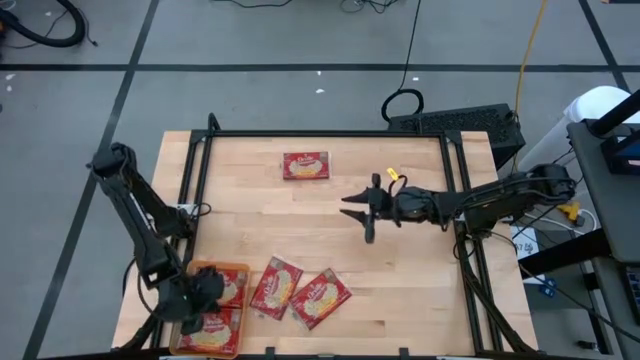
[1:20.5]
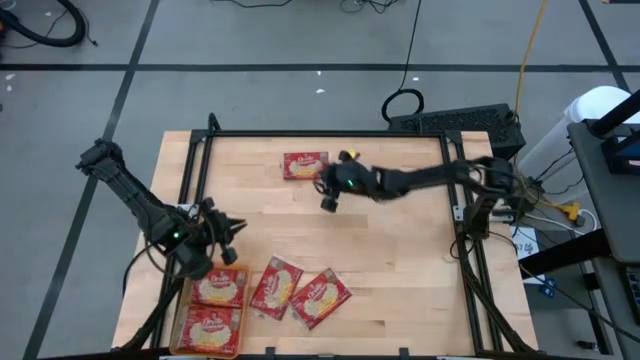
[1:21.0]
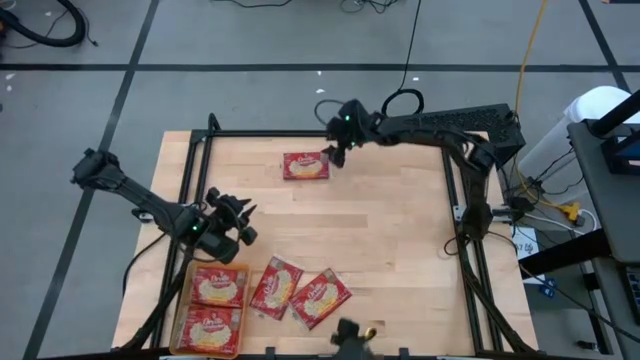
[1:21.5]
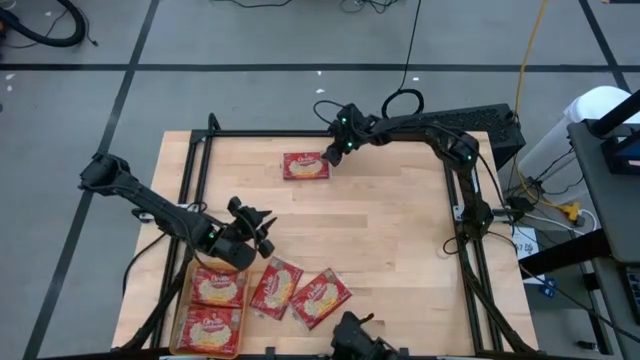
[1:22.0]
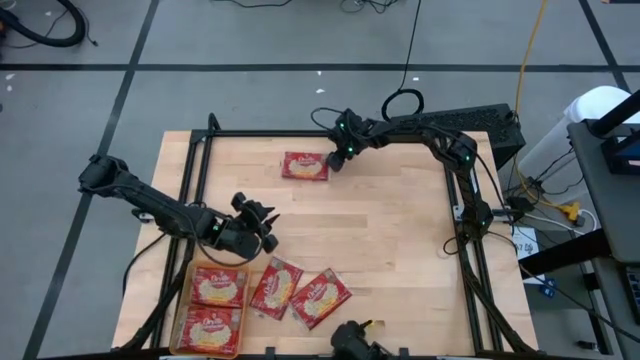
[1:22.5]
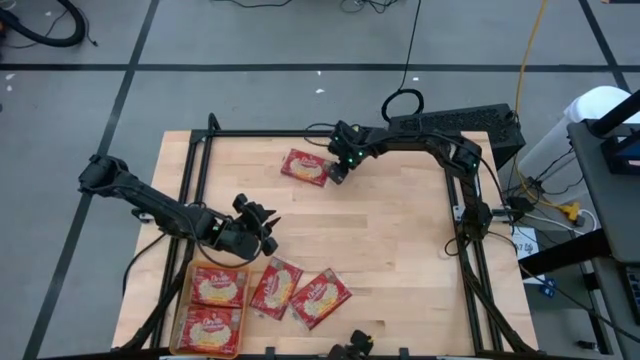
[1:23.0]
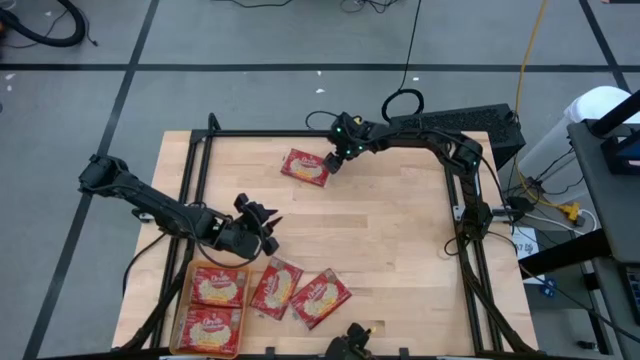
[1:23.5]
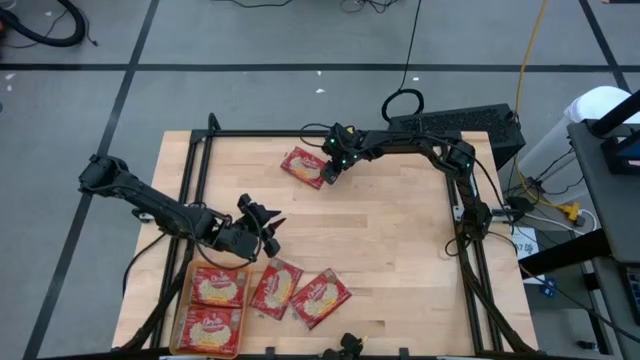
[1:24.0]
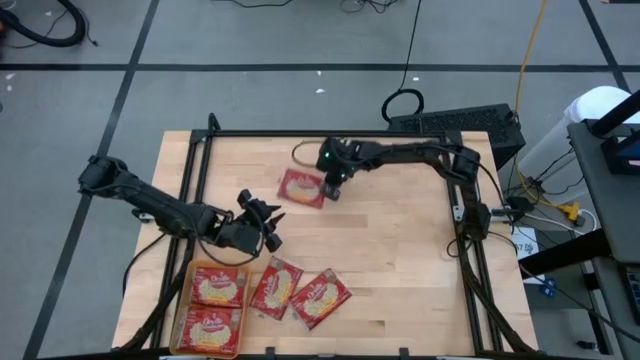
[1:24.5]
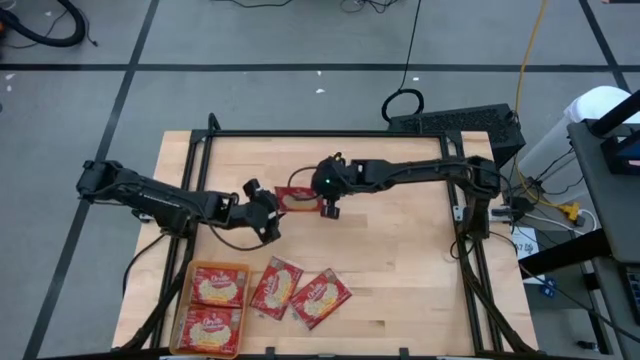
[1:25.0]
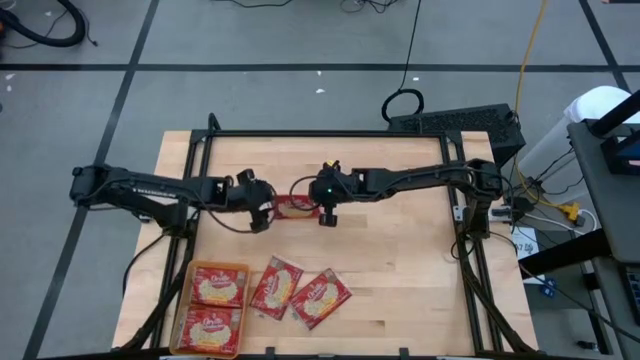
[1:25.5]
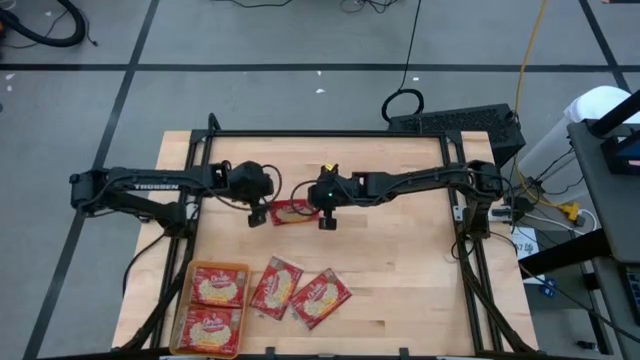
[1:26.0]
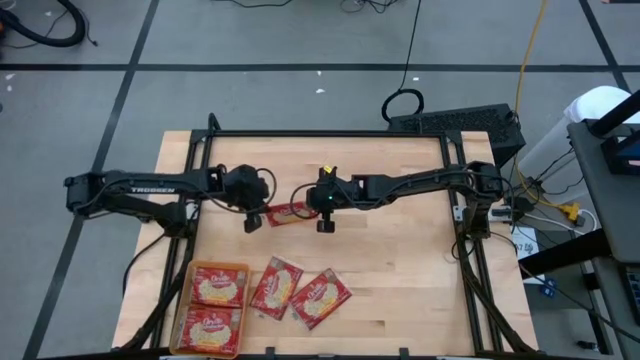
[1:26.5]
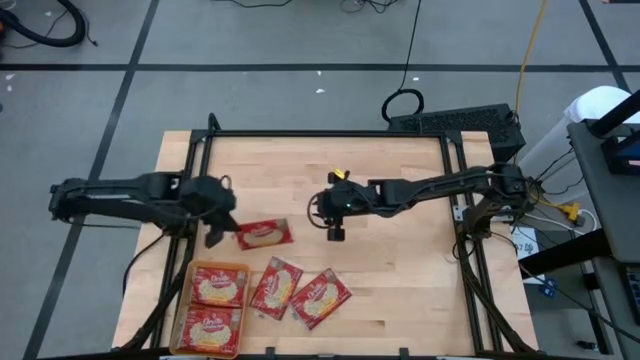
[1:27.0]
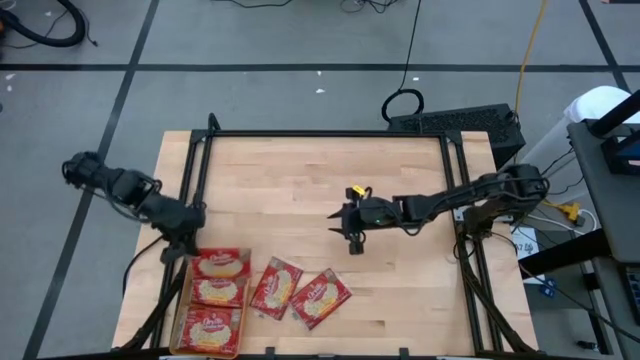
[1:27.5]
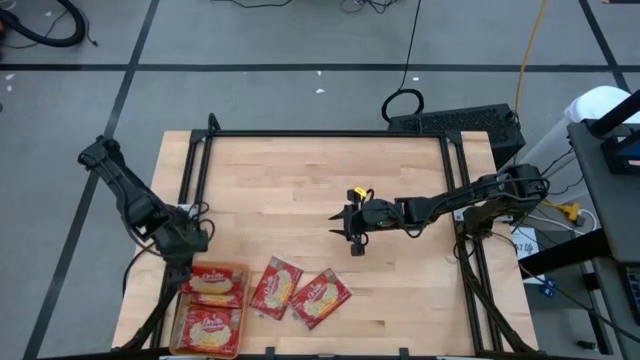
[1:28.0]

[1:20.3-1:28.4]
Task: Sort popcorn bags into baskets
Put the red popcorn bag into the orange bin

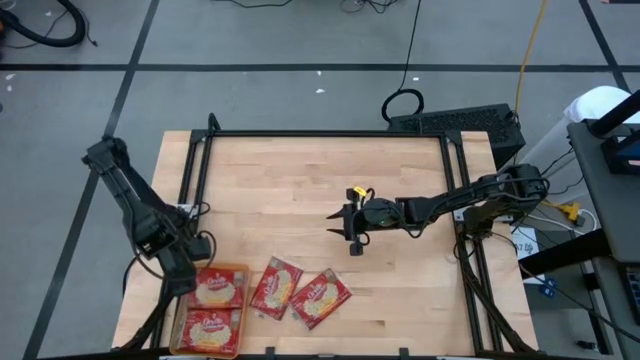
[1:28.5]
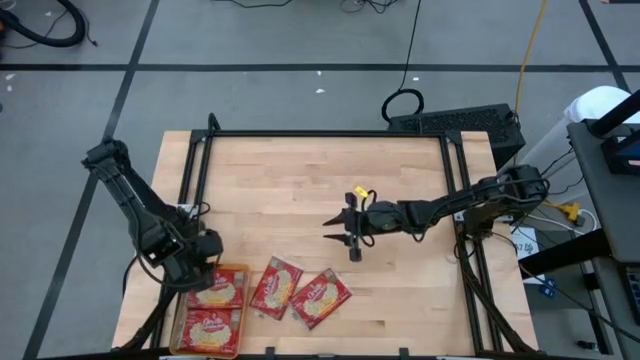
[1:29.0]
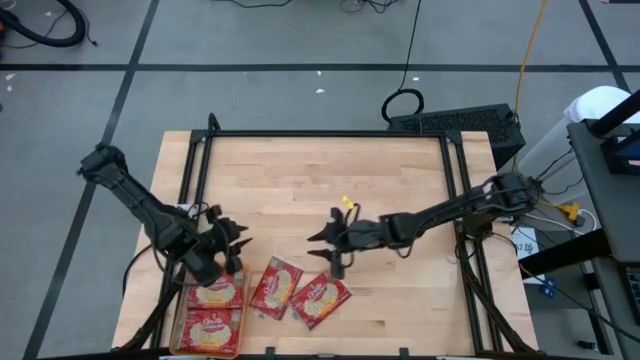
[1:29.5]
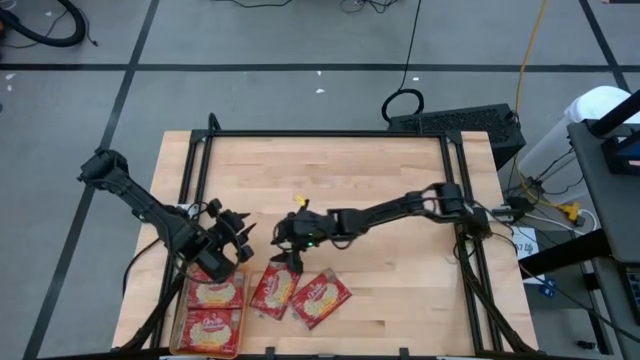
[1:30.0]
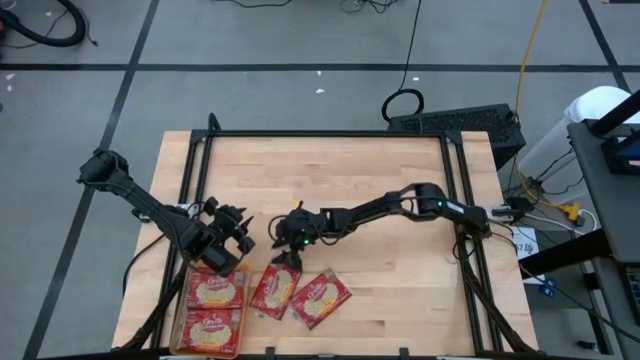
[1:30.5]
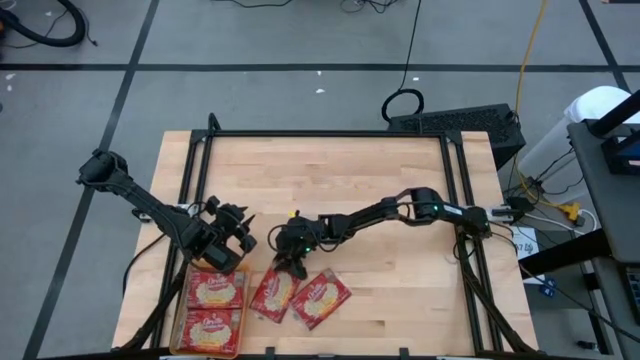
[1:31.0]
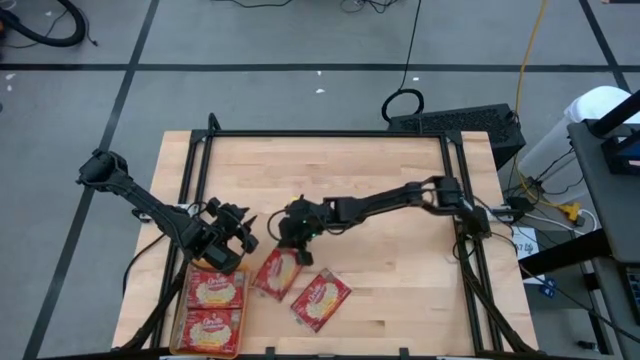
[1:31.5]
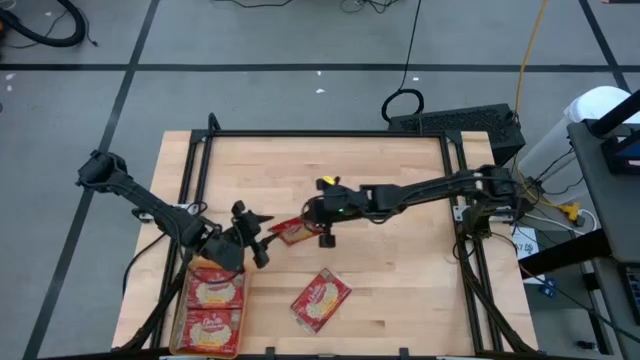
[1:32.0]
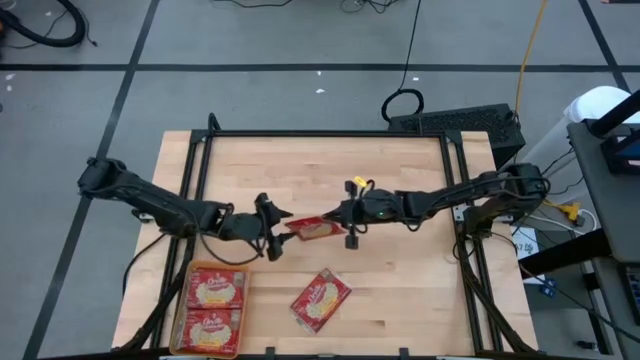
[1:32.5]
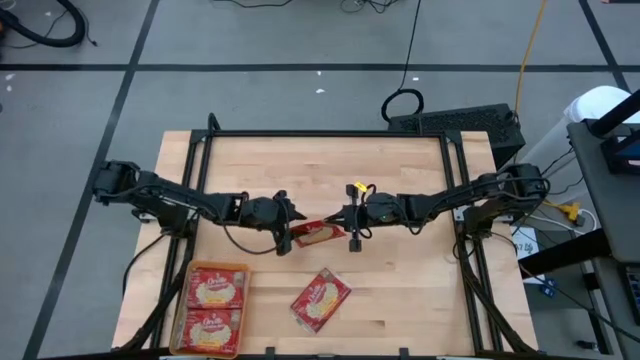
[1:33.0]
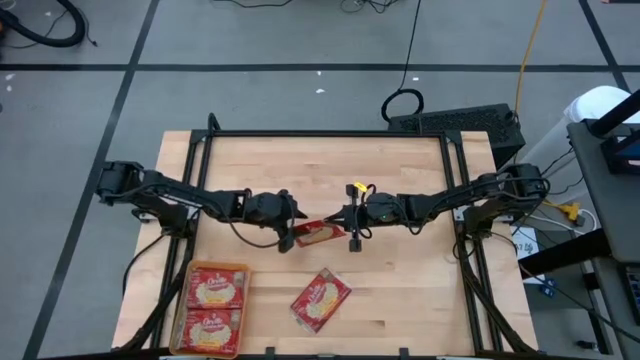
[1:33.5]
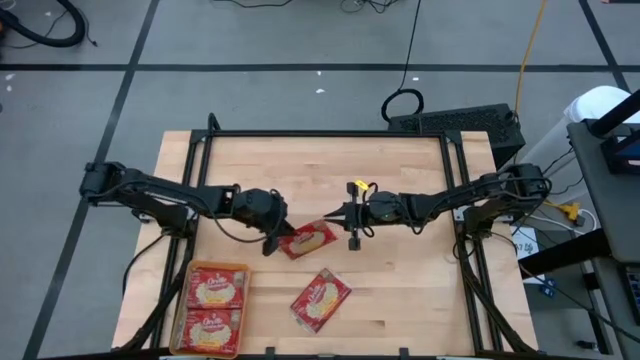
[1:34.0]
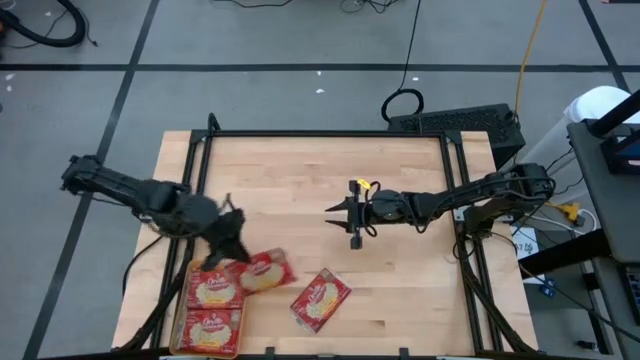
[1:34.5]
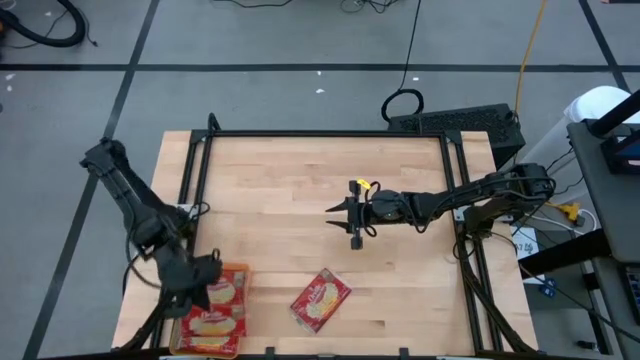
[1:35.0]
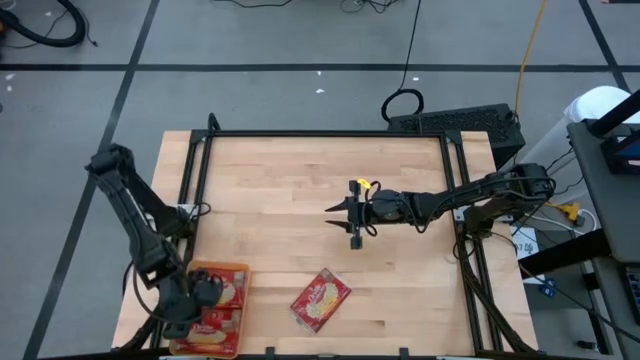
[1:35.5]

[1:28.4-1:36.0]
Put the red popcorn bag into the orange bin

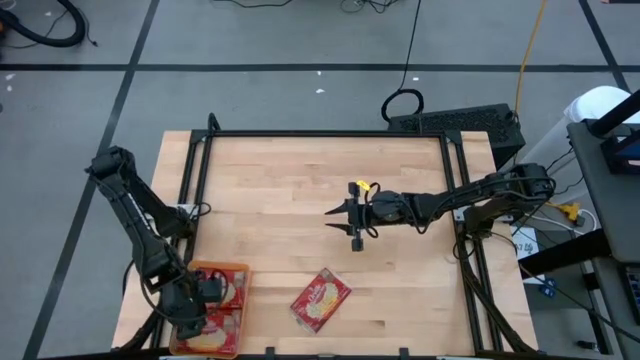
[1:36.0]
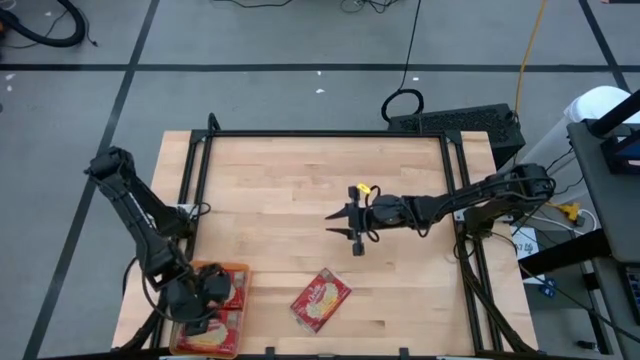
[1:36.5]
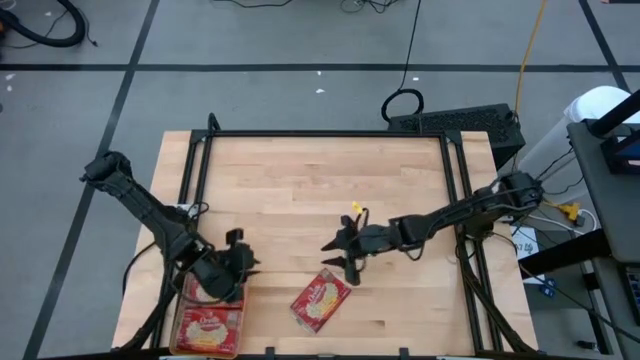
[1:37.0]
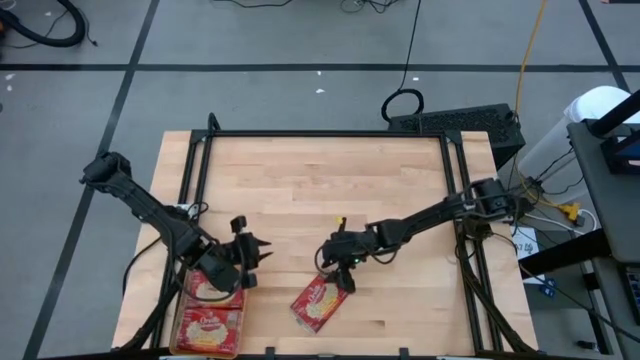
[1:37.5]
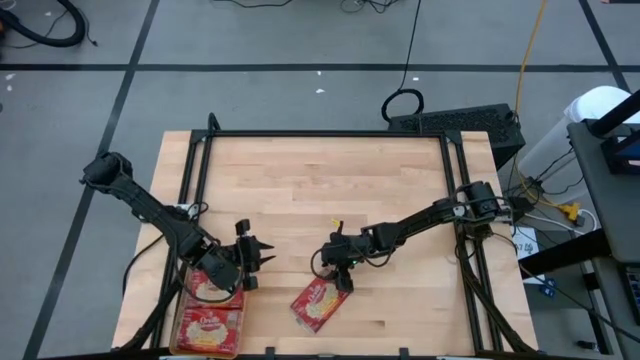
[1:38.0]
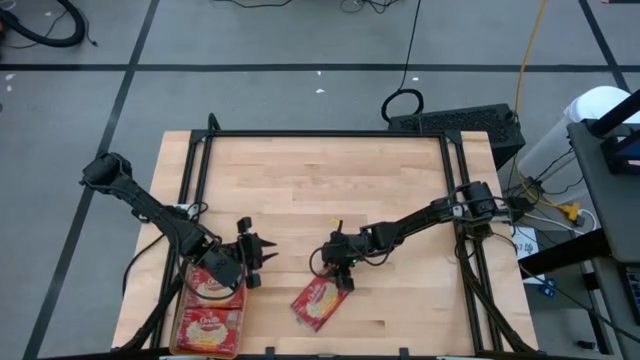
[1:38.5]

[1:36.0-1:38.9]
Put the red popcorn bag into the orange bin

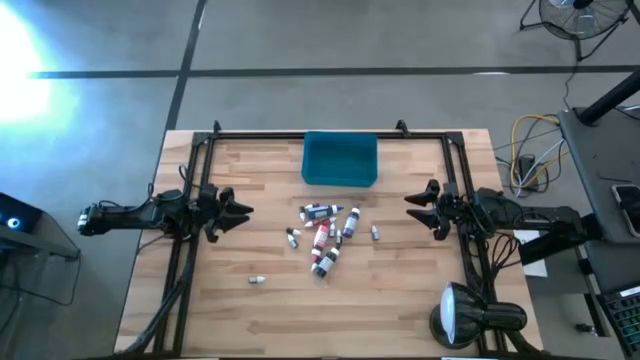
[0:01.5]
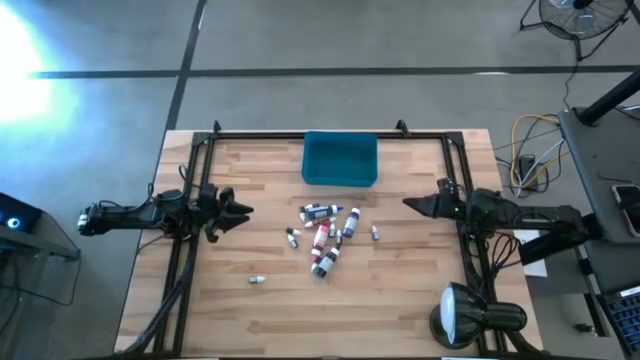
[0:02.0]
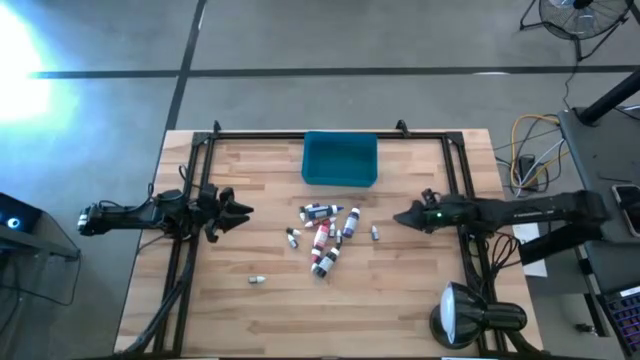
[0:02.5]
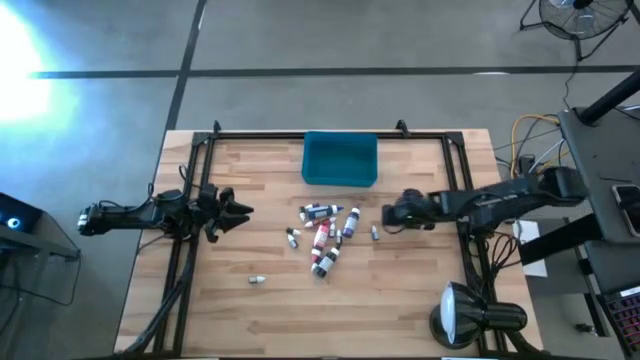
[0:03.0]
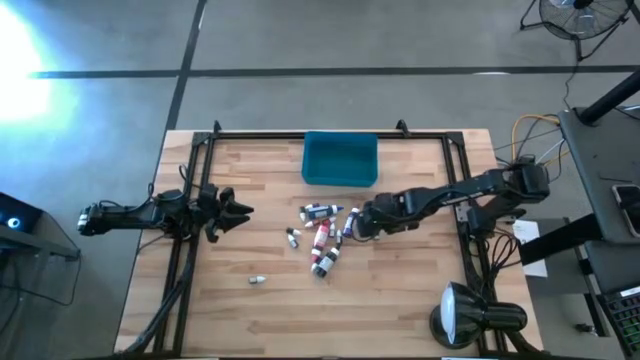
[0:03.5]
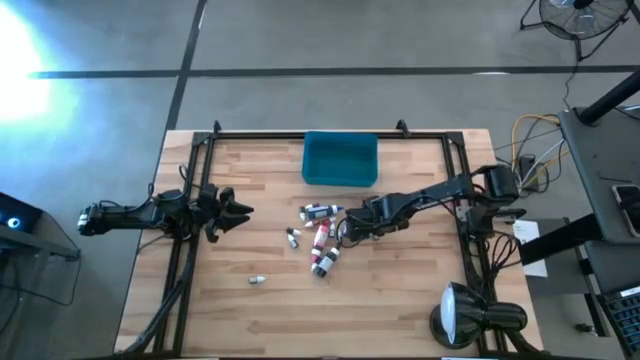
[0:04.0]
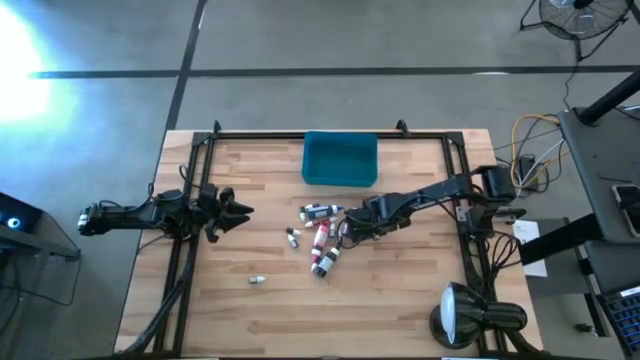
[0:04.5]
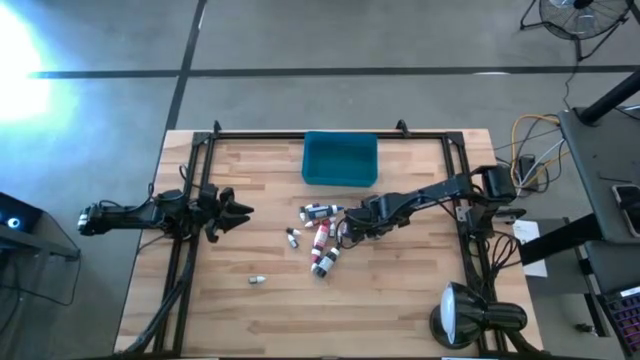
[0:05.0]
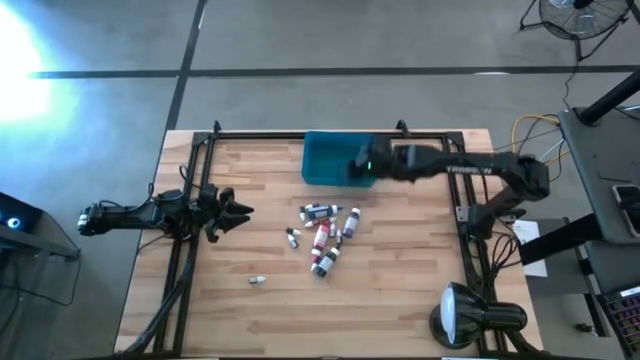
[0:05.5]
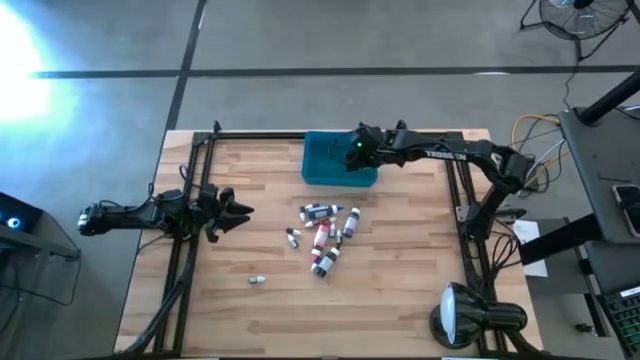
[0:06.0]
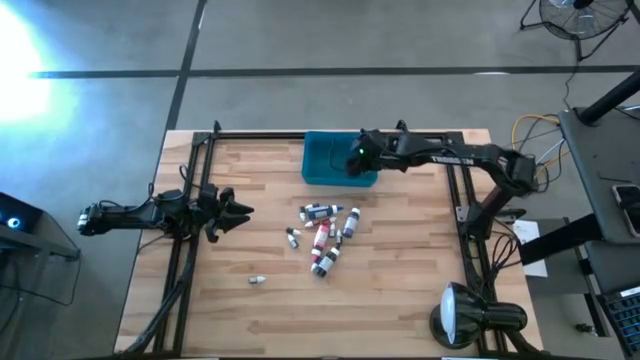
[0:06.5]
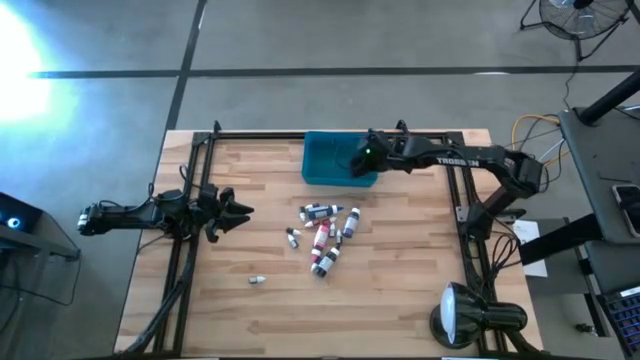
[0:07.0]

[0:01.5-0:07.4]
Task: Pick & Place food coloring
Put the small blue food coloring bottle into the blue bin
